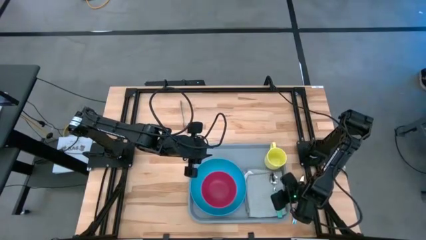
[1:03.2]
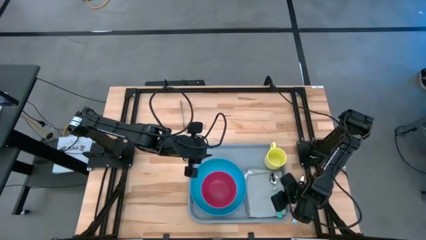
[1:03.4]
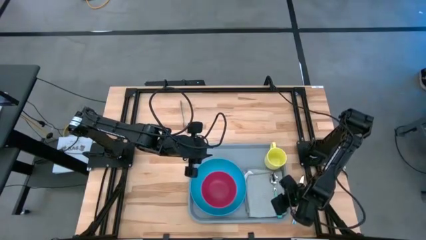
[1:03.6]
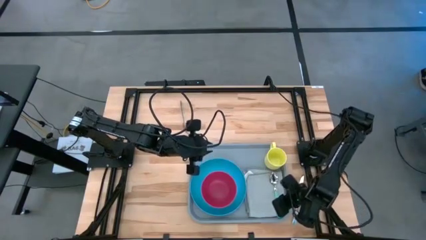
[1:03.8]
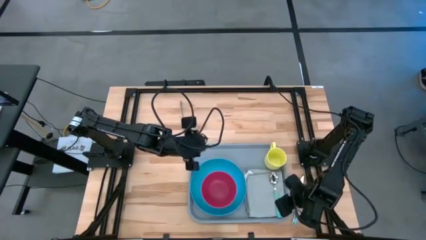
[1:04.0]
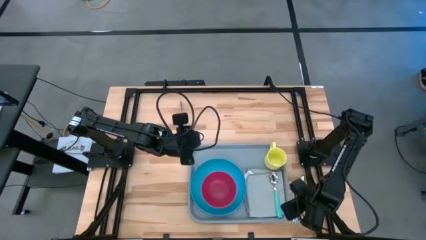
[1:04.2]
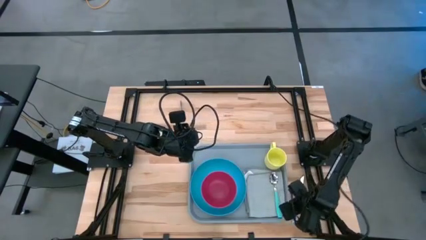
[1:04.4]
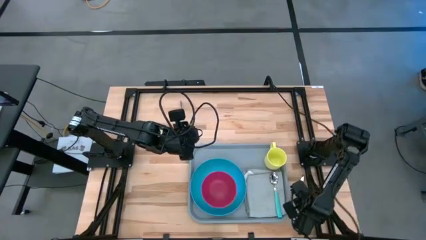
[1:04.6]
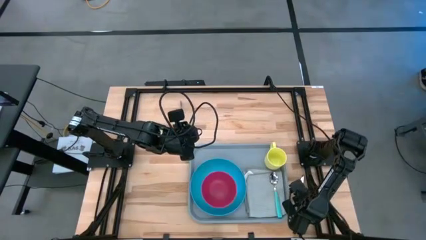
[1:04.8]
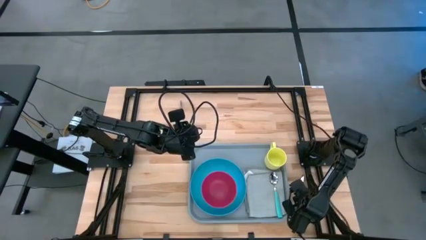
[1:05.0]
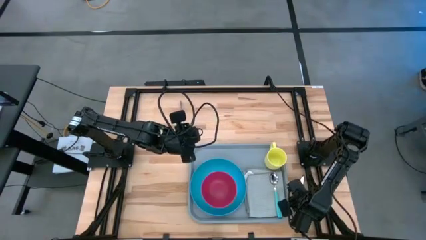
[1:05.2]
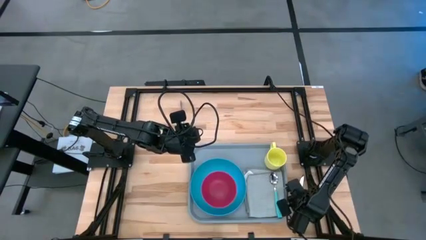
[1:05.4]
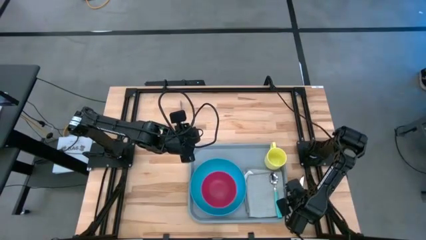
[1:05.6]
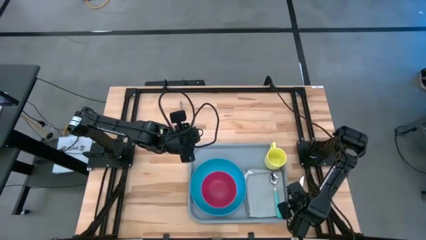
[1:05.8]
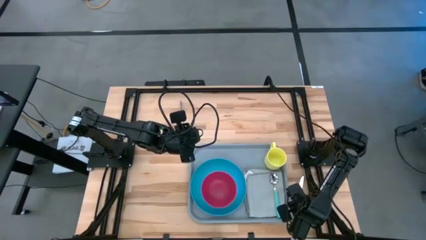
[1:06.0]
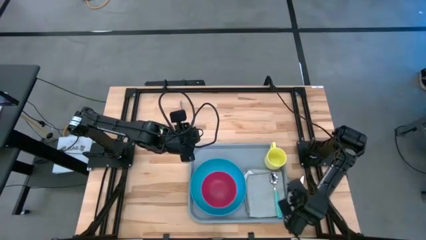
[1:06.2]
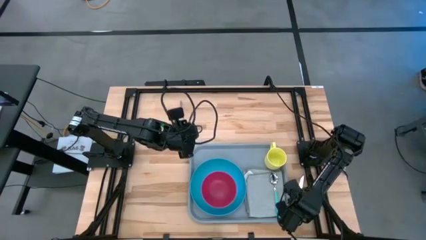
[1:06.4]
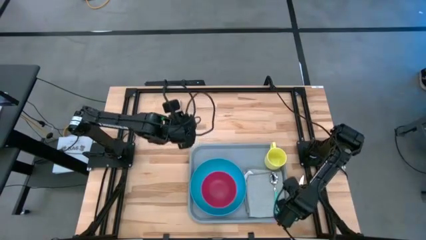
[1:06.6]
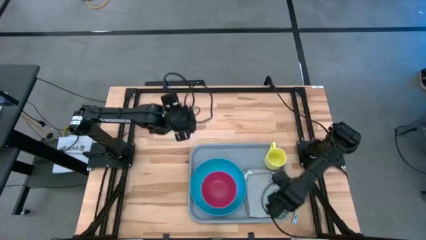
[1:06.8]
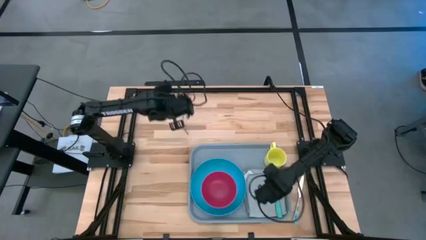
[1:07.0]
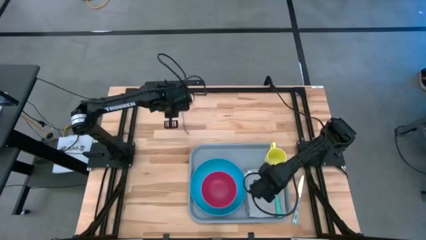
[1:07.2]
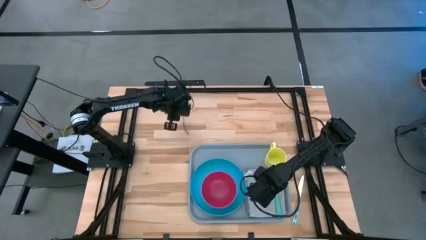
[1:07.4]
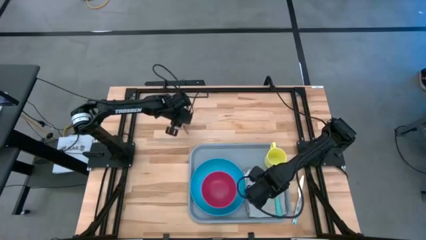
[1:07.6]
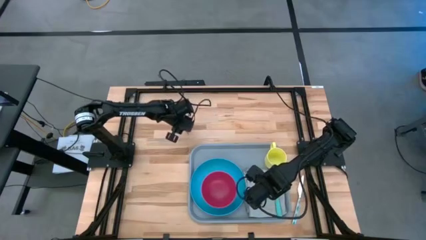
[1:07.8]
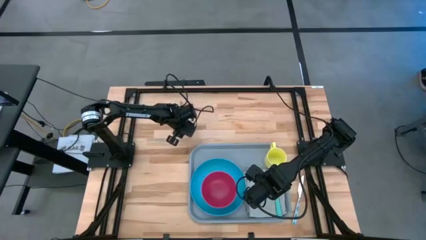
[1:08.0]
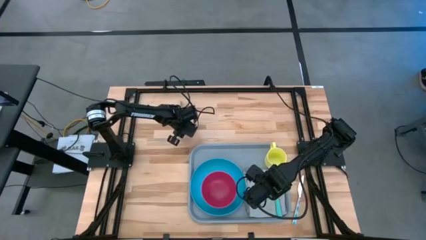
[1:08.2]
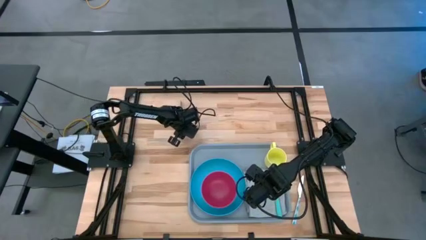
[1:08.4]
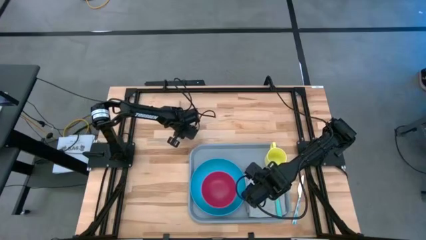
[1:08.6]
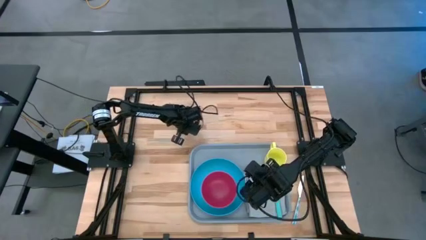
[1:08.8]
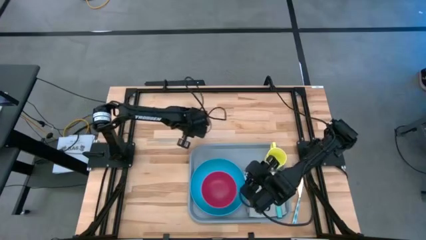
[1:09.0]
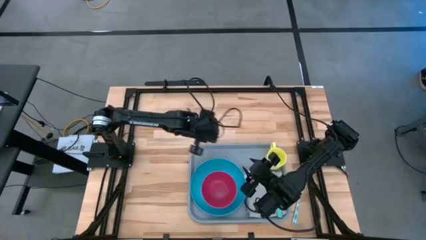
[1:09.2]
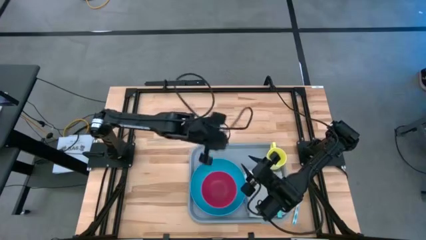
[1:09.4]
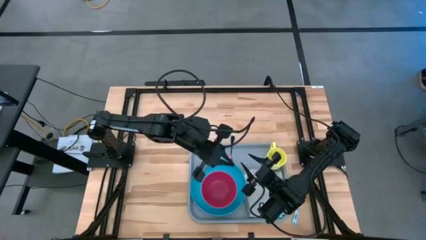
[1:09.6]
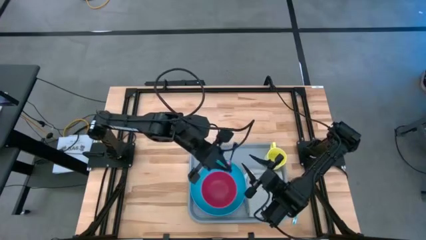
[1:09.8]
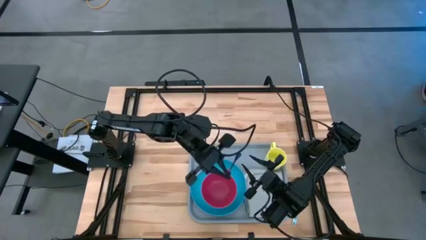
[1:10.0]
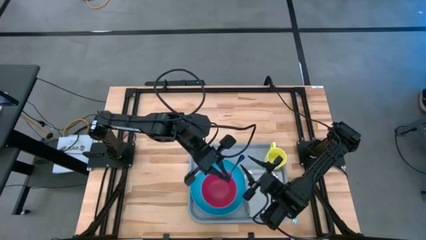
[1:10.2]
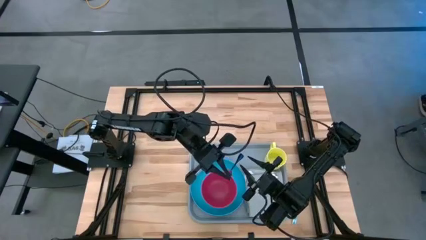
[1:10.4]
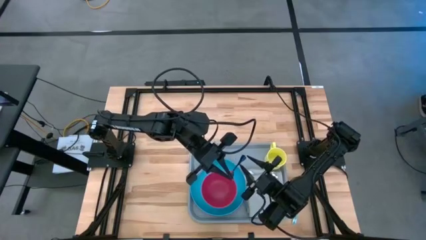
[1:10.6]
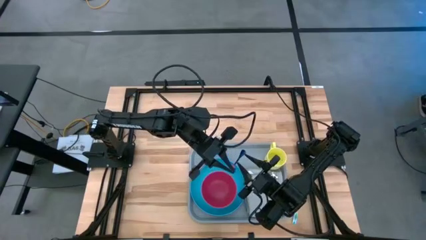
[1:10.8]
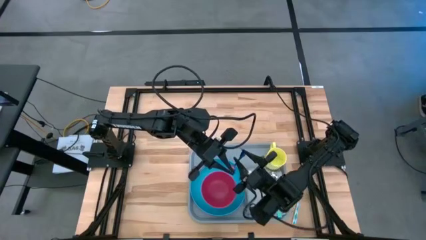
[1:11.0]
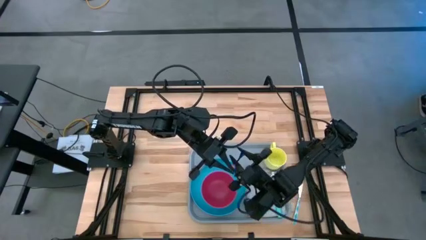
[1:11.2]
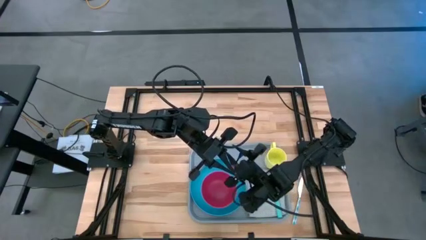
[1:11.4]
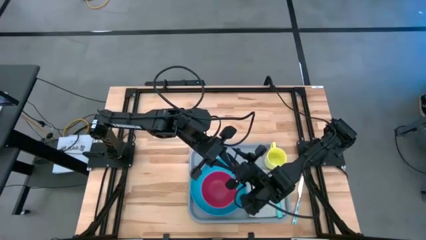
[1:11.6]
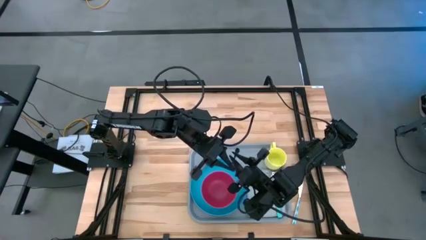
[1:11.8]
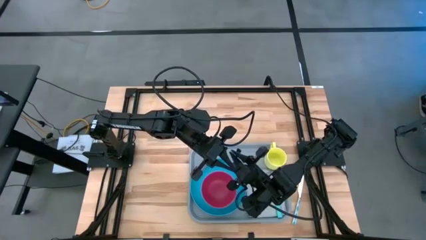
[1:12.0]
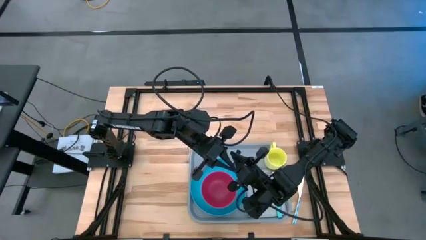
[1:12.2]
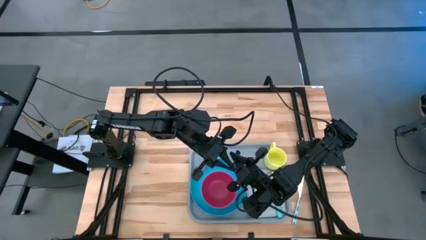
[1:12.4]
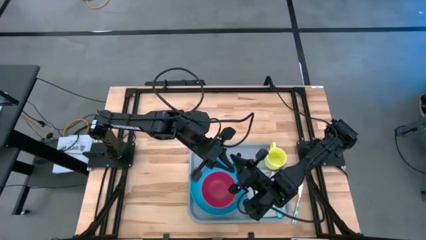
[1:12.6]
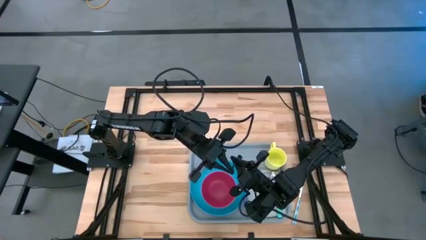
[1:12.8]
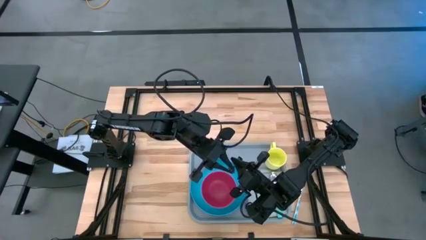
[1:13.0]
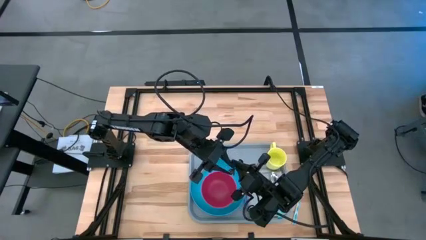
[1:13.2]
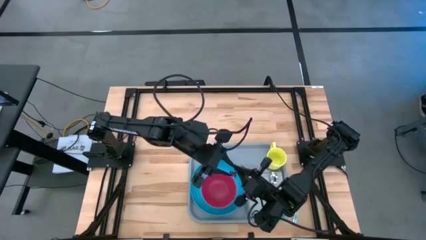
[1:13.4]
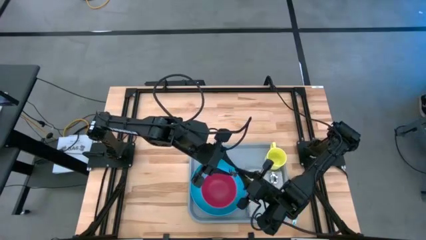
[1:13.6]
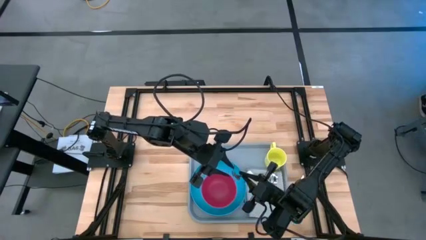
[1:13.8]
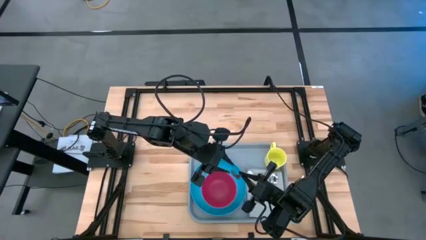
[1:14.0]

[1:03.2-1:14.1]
Task: Set up tray
Put the purple fork to the left of the blue spoon on the gray table napkin

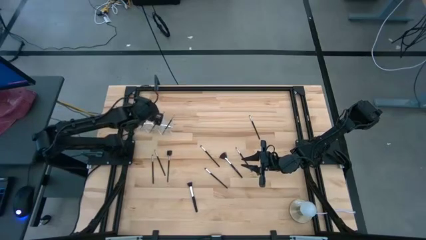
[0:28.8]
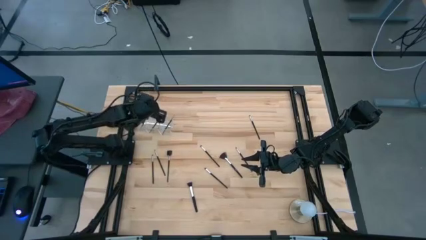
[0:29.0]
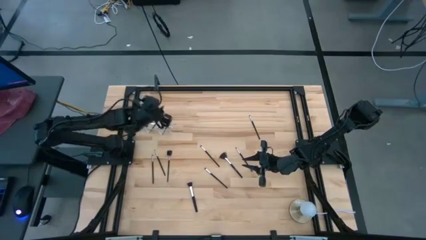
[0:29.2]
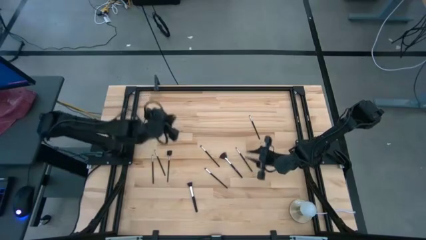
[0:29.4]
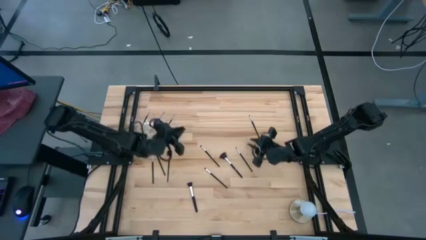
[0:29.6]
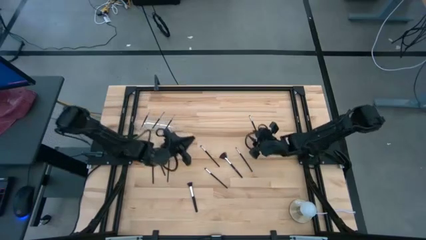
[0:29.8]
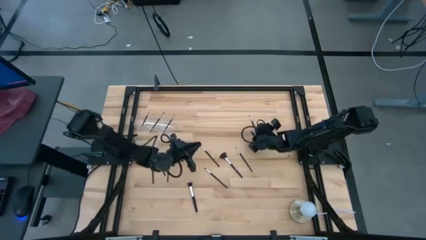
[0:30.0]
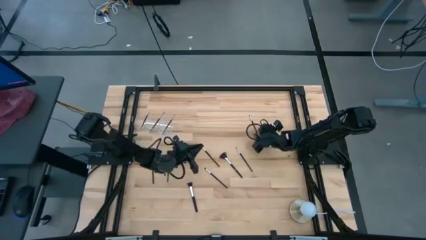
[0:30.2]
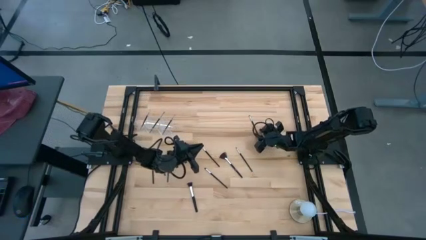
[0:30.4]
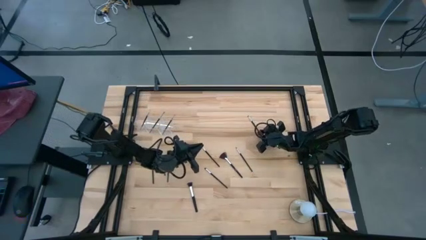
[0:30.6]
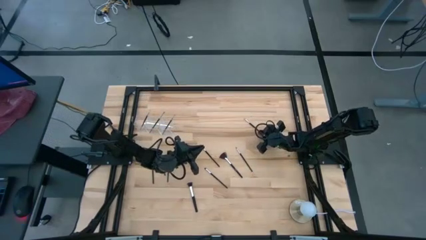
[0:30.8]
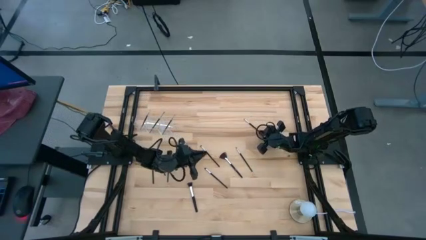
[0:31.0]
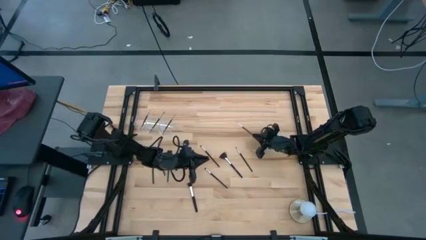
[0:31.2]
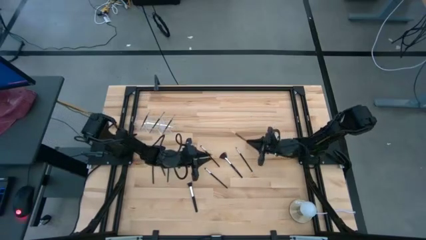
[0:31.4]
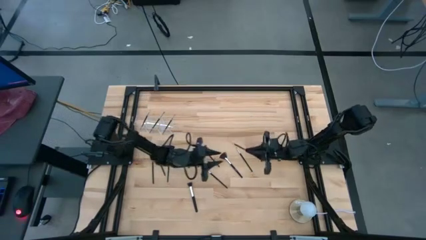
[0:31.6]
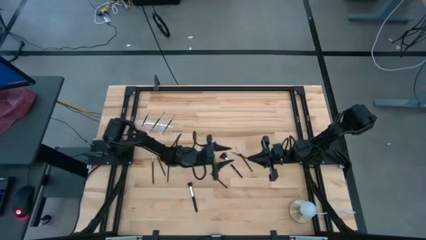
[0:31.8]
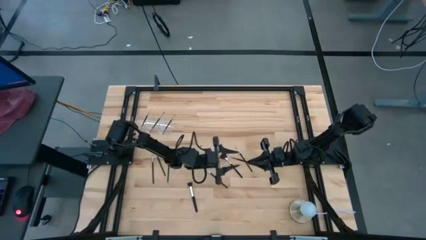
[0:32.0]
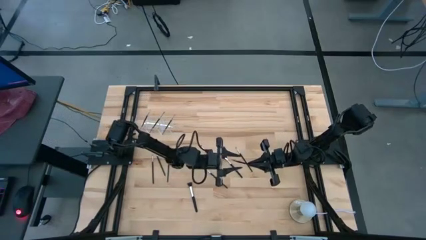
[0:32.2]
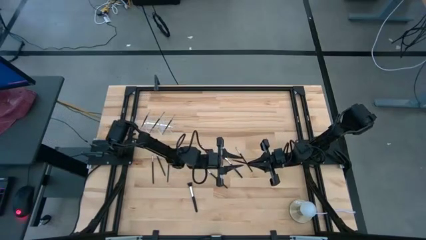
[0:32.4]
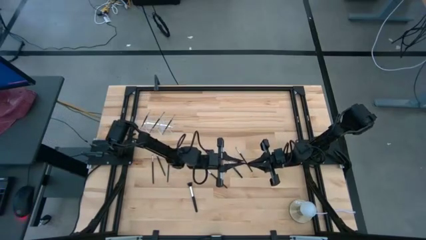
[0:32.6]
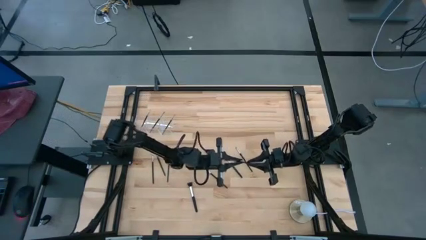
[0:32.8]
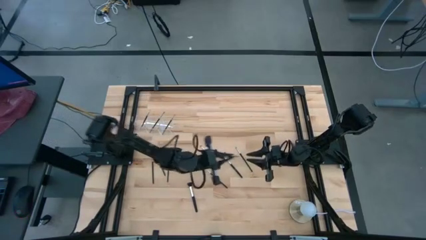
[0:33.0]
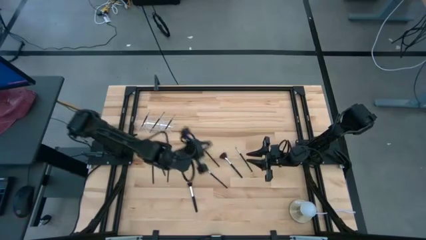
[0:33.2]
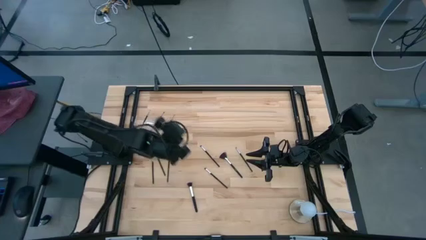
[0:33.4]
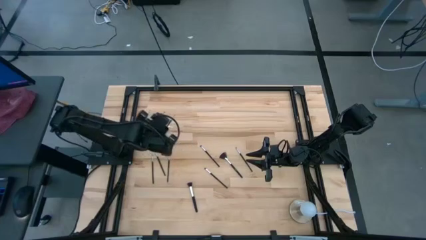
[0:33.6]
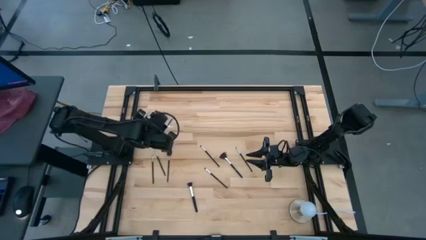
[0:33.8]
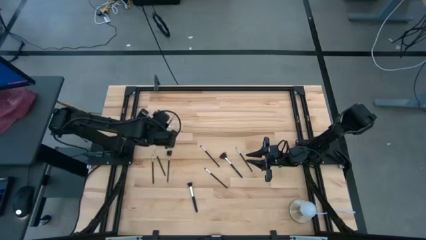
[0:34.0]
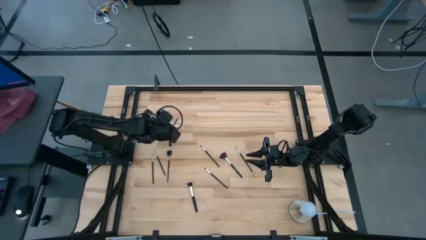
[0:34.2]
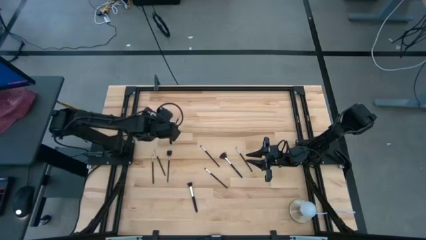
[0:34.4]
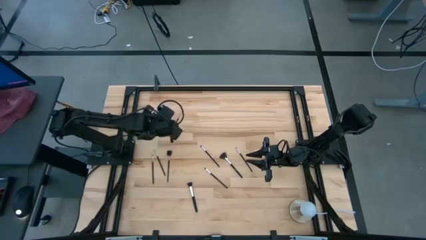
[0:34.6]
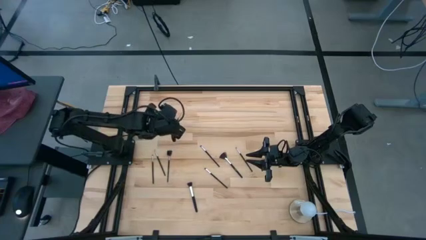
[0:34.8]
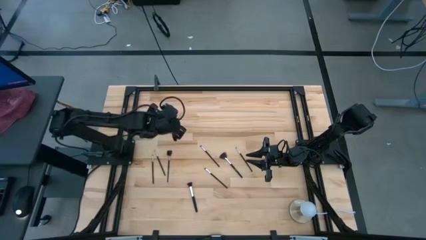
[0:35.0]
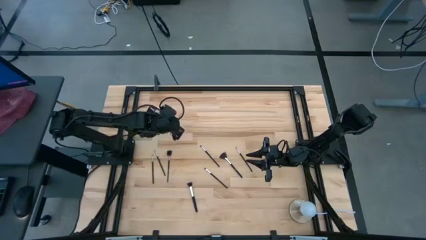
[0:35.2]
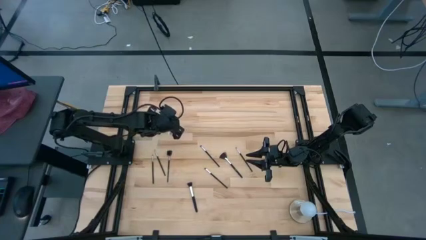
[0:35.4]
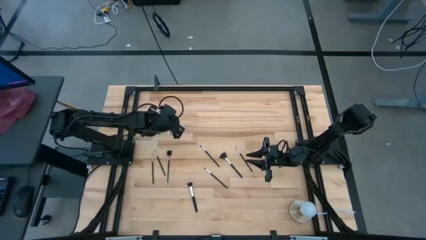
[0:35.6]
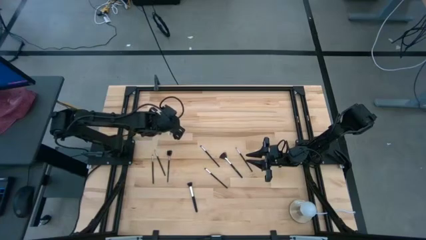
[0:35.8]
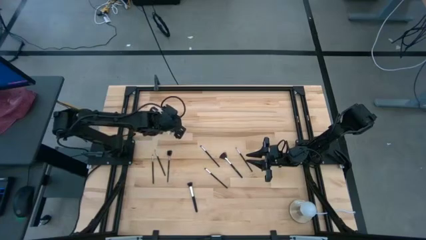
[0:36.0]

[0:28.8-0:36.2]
Task: Put items in baskets/containers
Put the eyeshadow brush into the transparent organizer
